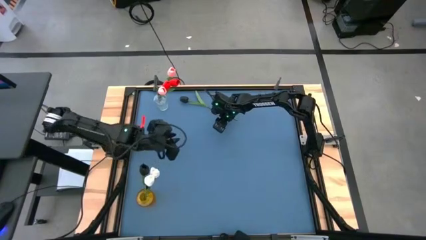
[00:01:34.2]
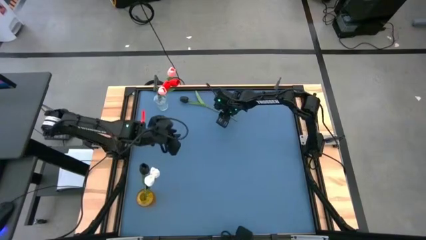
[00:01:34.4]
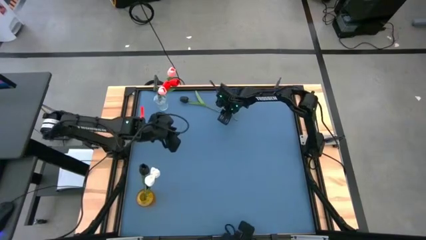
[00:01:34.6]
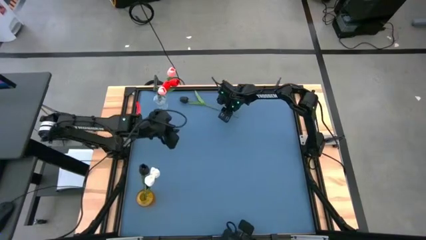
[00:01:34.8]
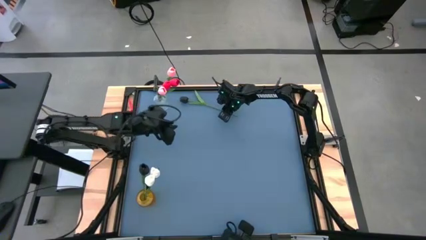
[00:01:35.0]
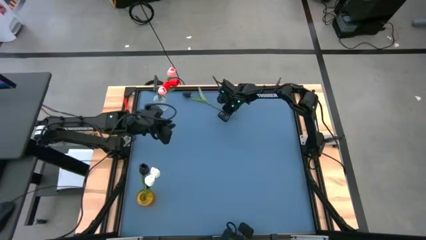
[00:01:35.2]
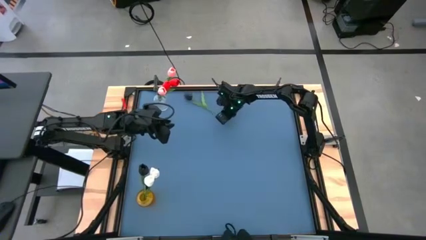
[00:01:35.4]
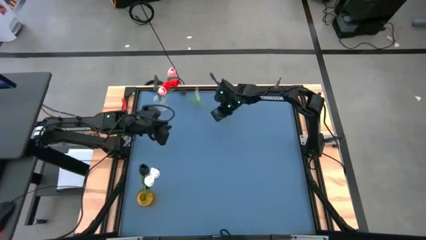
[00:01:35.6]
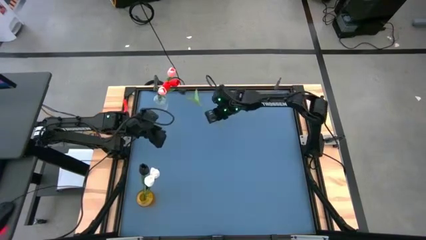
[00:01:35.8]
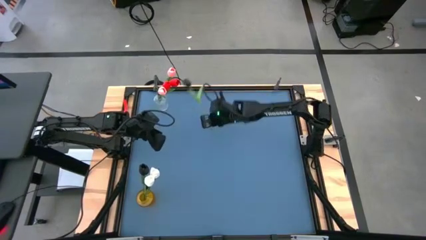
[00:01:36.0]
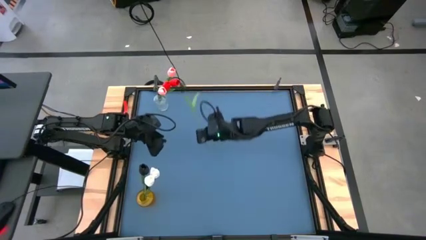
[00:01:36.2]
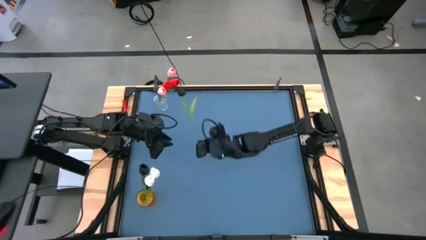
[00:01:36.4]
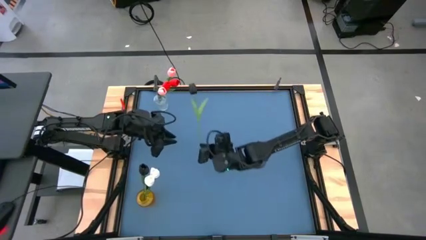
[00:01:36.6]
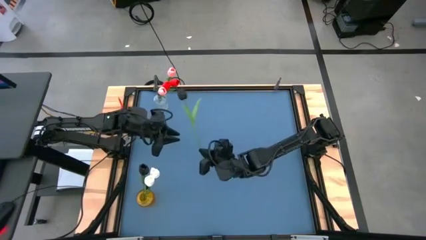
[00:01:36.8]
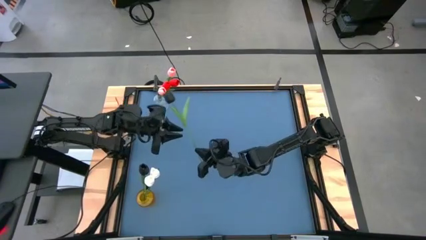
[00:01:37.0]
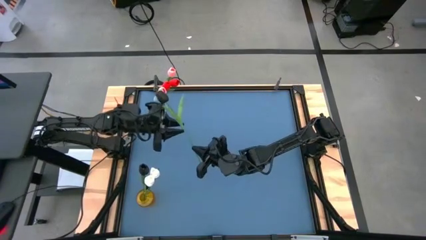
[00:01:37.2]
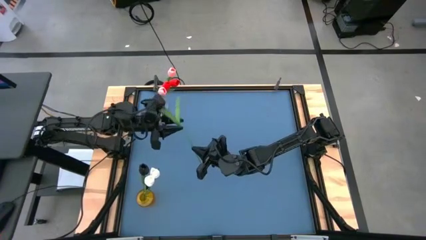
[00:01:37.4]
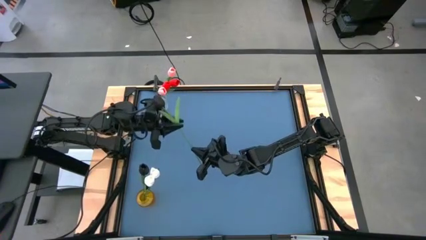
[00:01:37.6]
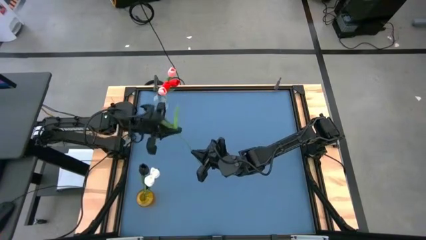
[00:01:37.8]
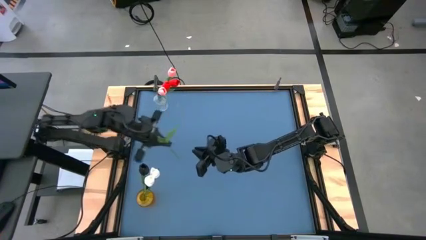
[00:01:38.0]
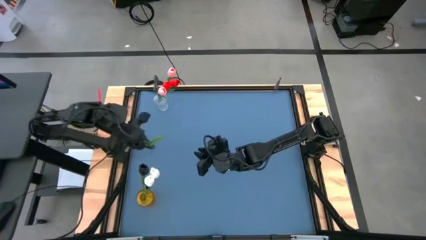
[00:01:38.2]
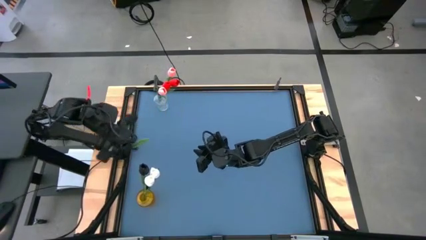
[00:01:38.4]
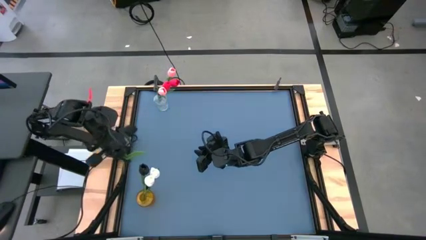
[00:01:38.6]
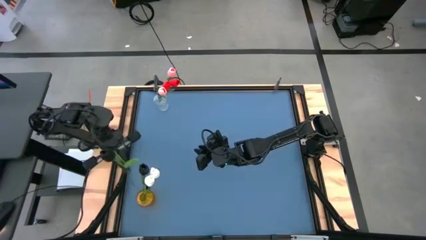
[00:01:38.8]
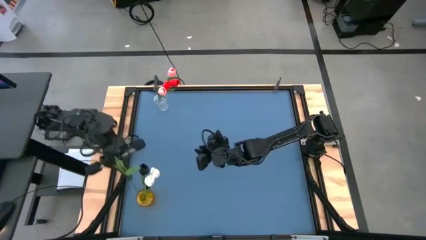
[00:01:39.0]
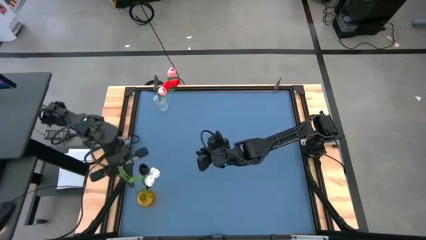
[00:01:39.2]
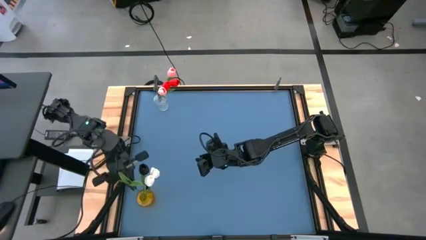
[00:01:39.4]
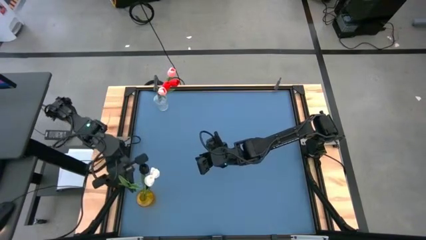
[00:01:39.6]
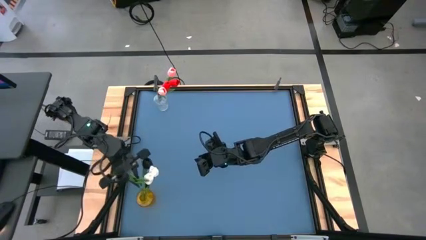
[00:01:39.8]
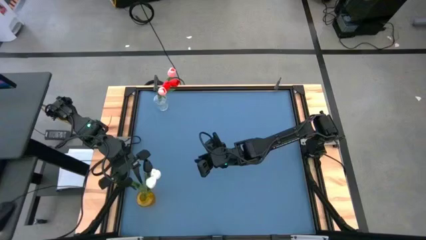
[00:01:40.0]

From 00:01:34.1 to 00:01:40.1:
Task: Sort flowers into vase by color
Put the black flower into the yellow vase

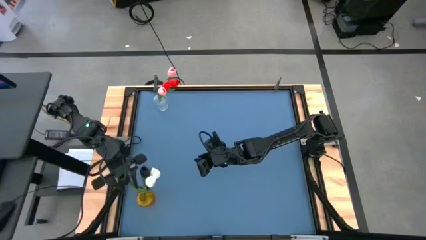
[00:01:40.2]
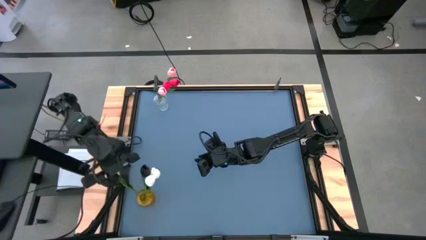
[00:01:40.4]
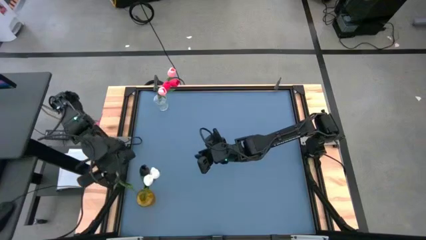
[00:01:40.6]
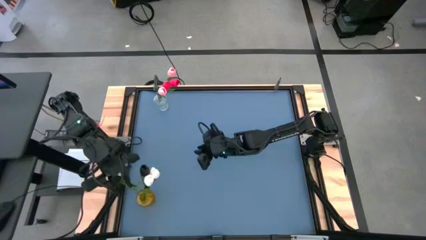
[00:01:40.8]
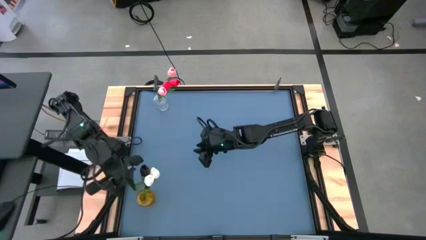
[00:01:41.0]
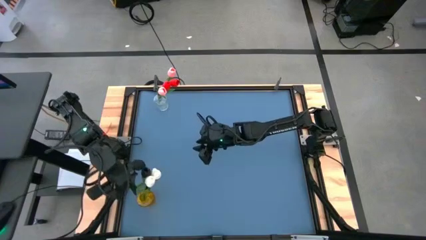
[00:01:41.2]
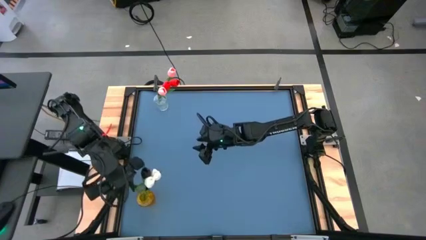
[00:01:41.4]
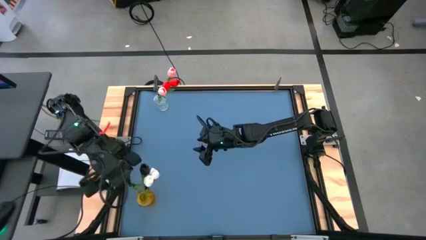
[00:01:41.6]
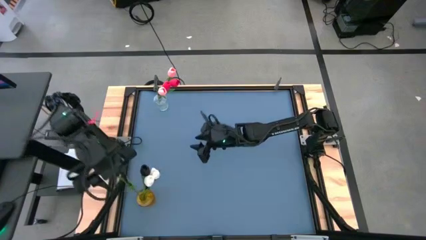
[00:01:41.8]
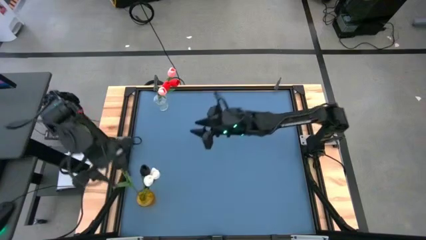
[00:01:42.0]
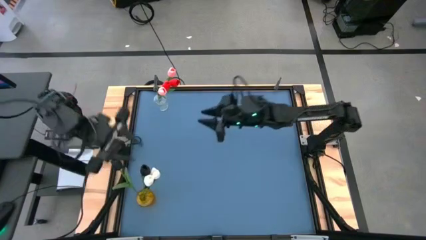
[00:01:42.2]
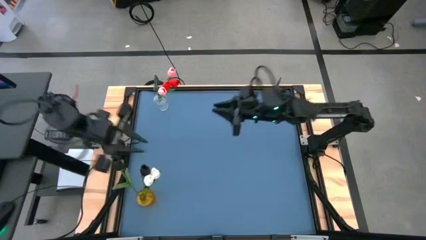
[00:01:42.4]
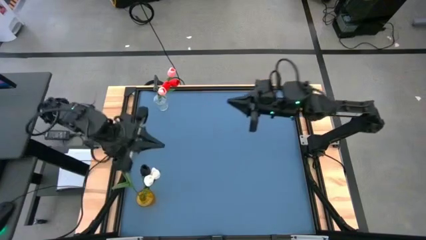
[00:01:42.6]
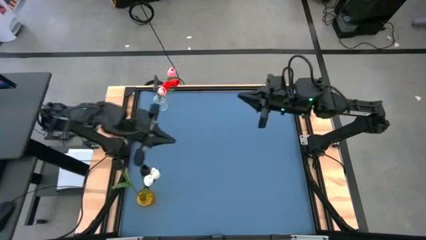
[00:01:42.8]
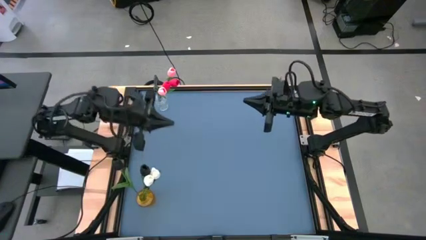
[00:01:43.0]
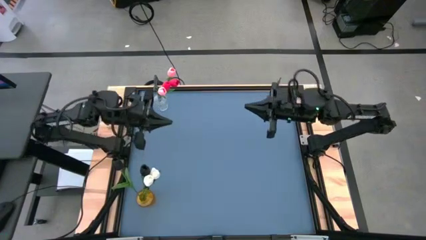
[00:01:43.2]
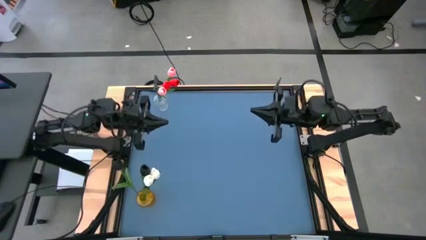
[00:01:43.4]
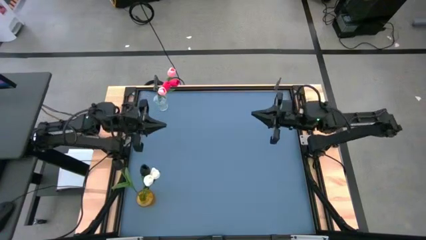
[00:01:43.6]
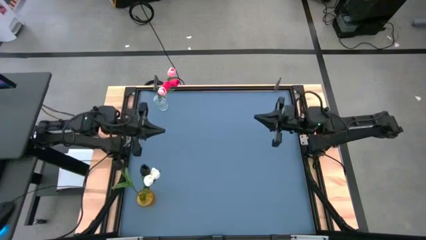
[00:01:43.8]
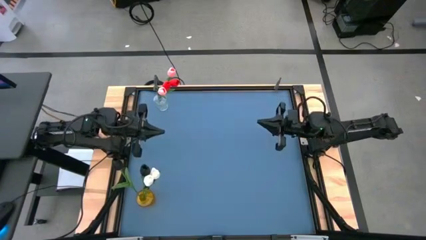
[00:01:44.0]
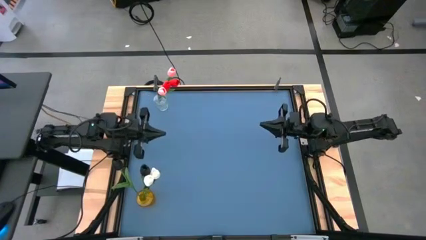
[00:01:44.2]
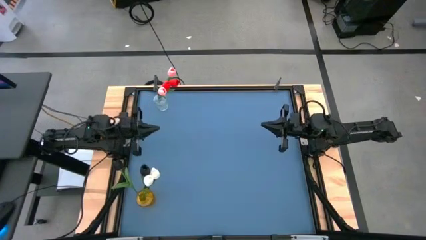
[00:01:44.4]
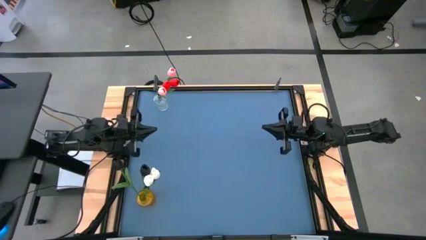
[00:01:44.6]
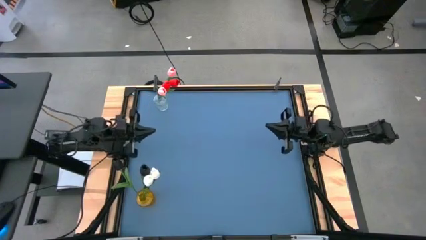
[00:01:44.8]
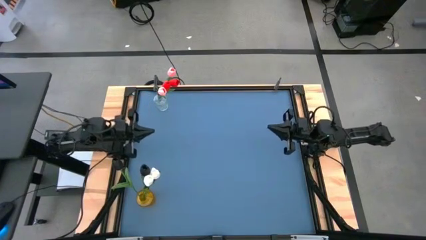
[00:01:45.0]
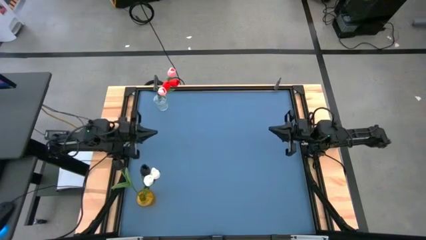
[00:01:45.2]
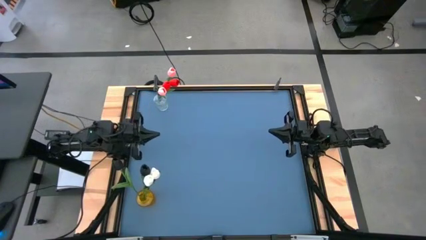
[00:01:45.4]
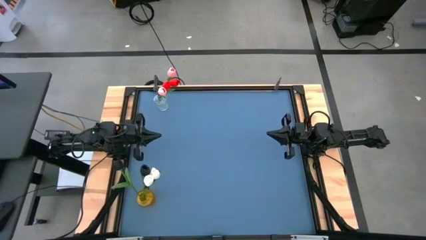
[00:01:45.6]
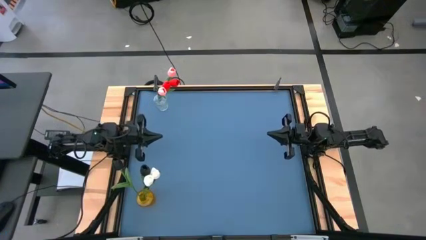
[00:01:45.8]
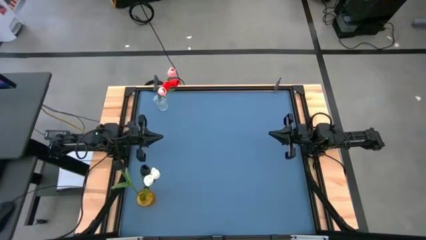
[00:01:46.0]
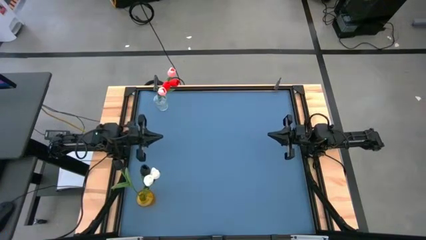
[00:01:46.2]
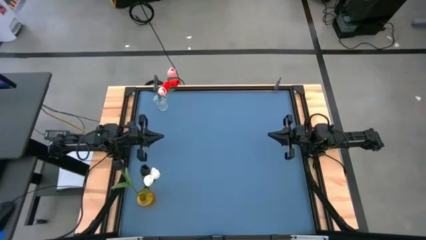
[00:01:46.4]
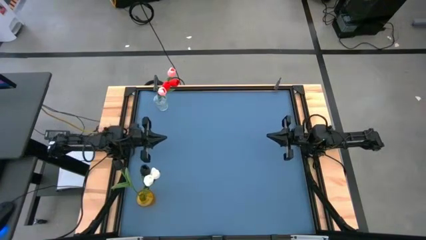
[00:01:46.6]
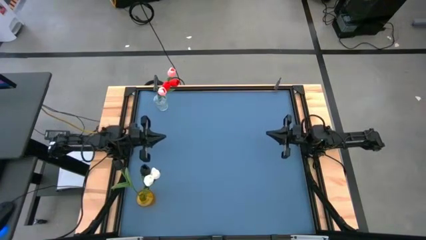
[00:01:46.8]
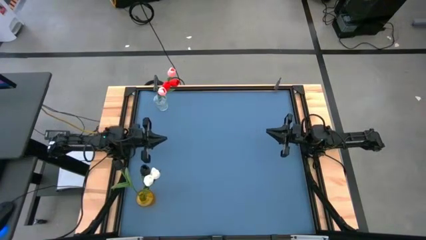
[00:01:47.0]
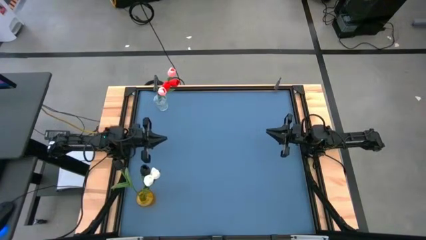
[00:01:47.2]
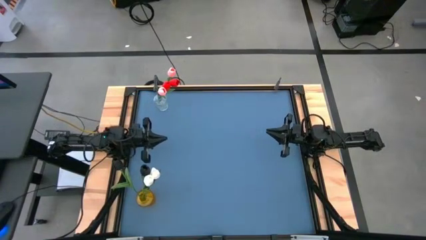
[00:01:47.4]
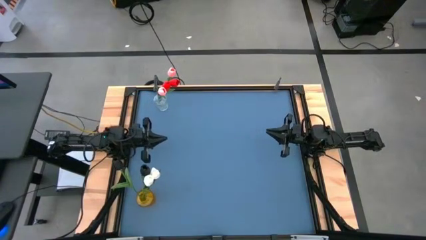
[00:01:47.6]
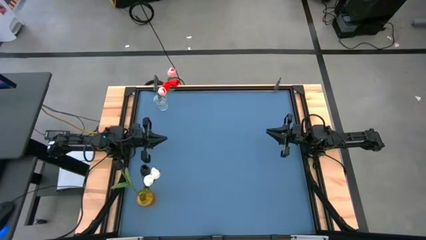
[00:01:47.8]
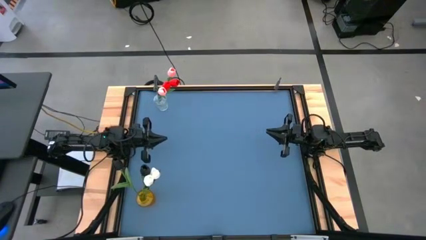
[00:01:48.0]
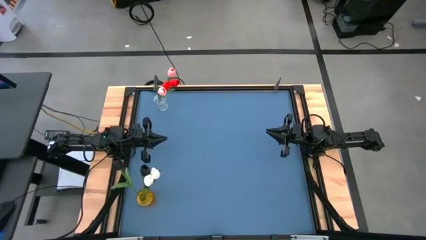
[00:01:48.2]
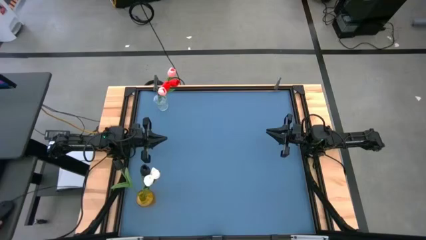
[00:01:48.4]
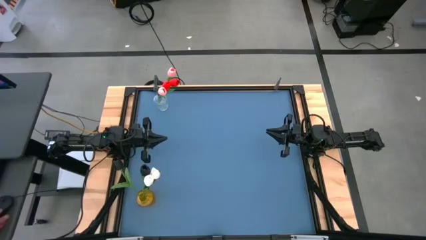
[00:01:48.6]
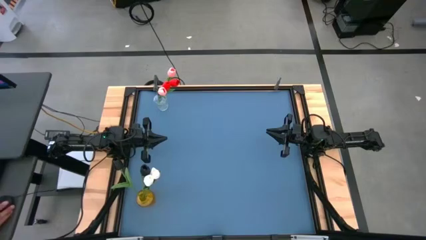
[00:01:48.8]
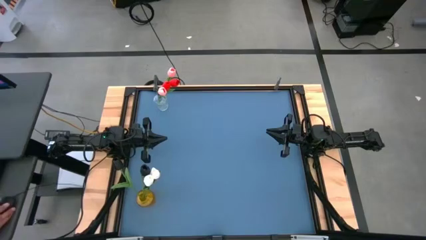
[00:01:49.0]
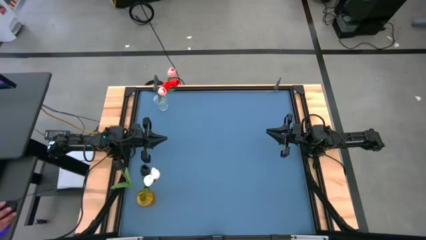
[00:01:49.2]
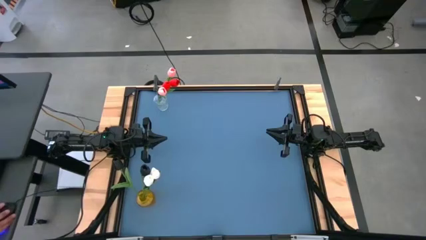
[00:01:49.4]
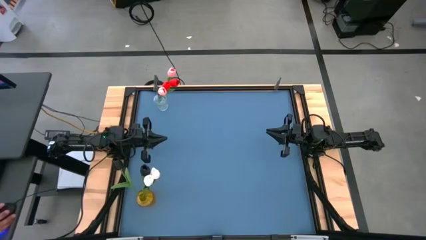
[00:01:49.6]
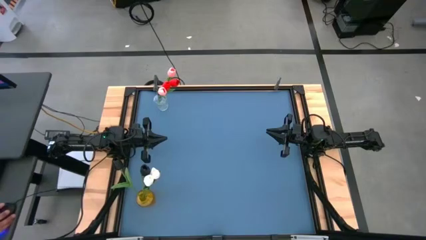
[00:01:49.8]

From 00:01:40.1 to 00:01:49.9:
Return To Home Position
